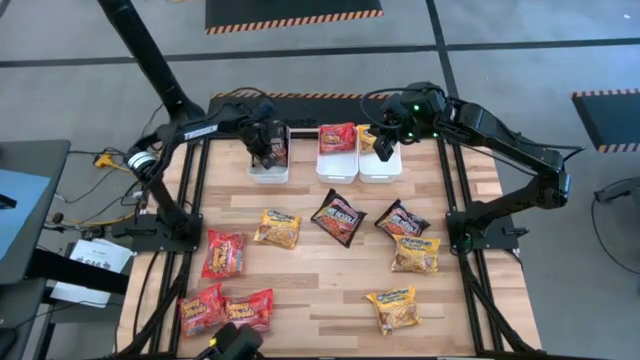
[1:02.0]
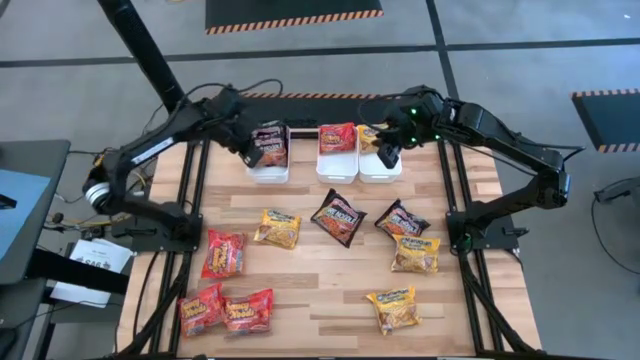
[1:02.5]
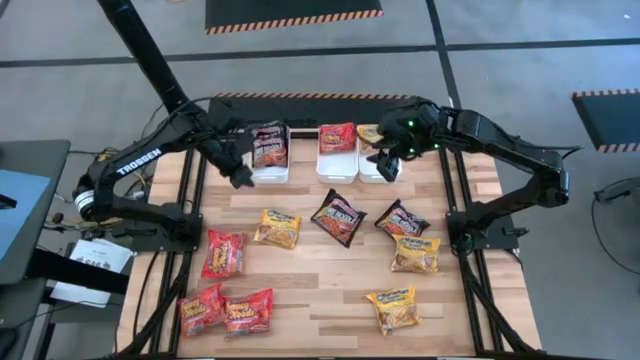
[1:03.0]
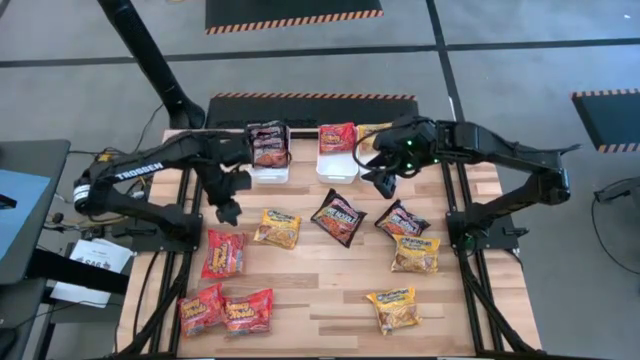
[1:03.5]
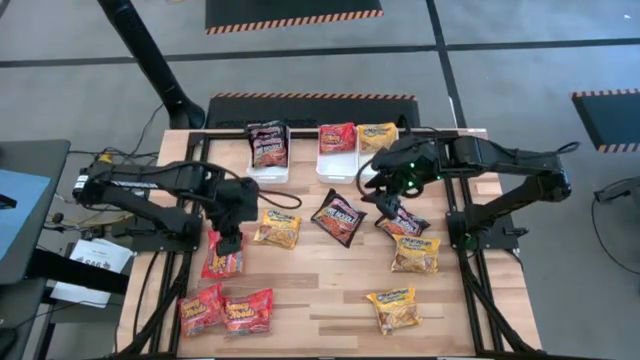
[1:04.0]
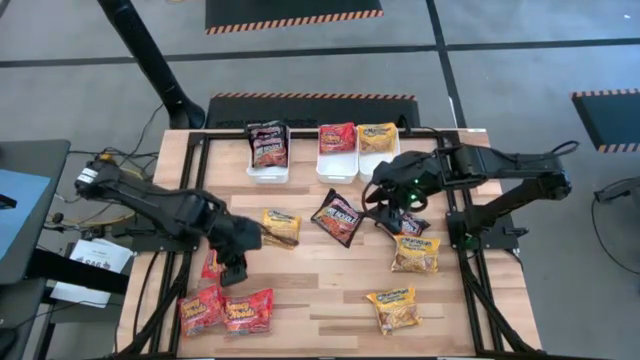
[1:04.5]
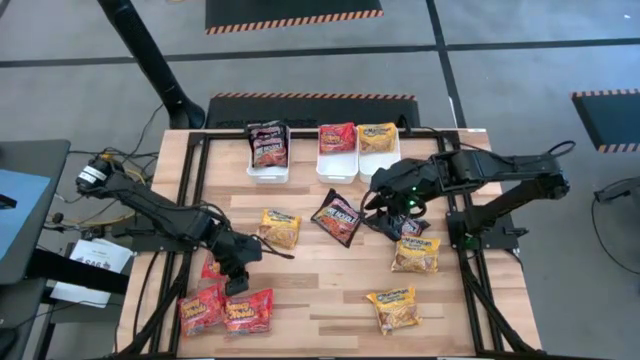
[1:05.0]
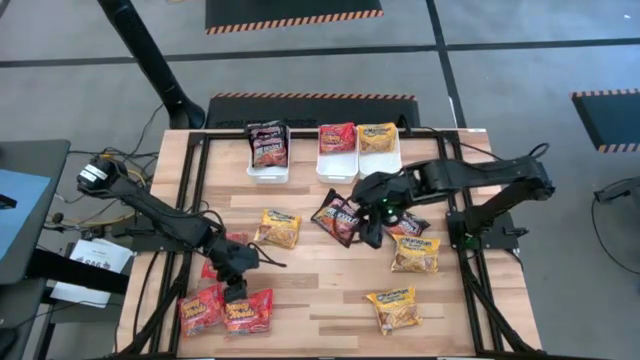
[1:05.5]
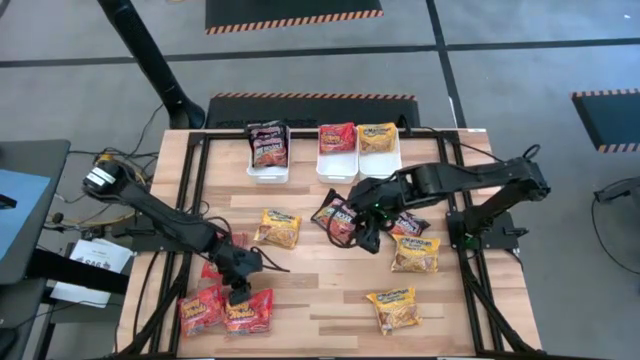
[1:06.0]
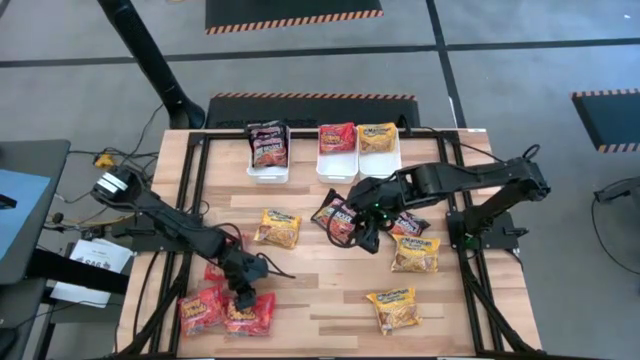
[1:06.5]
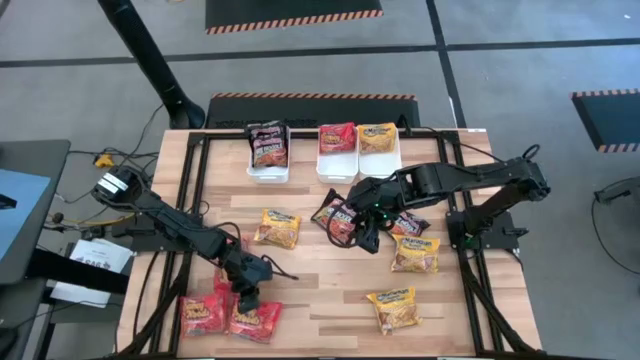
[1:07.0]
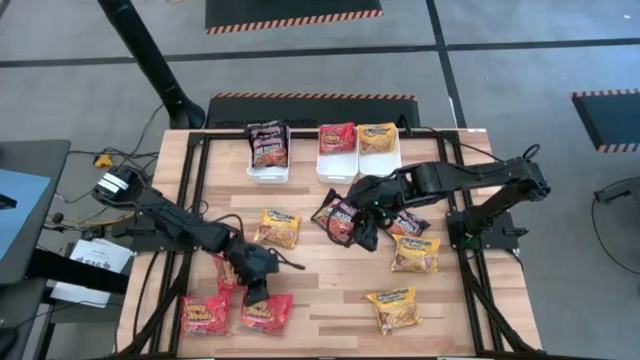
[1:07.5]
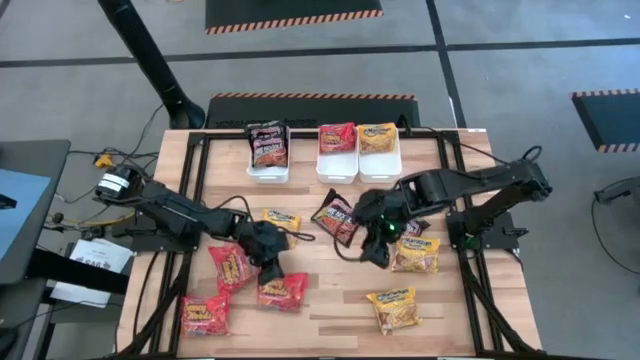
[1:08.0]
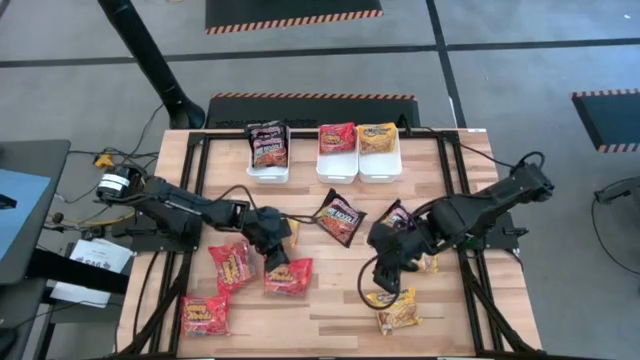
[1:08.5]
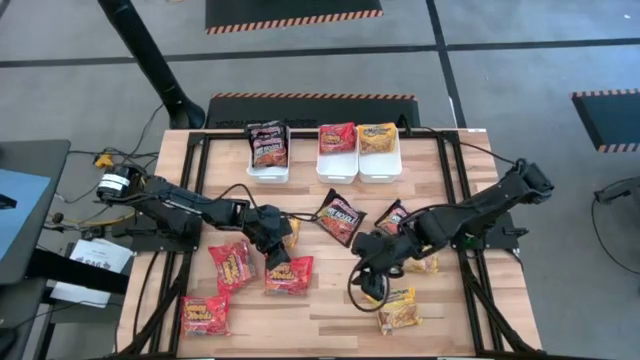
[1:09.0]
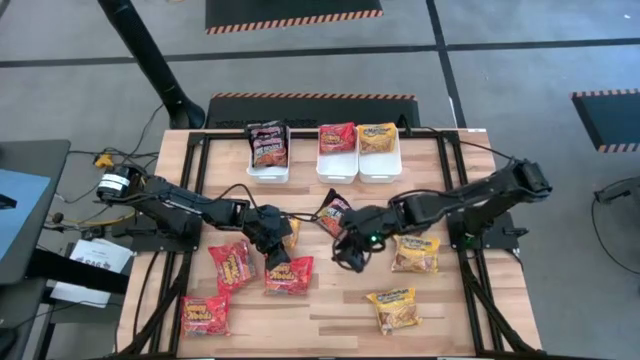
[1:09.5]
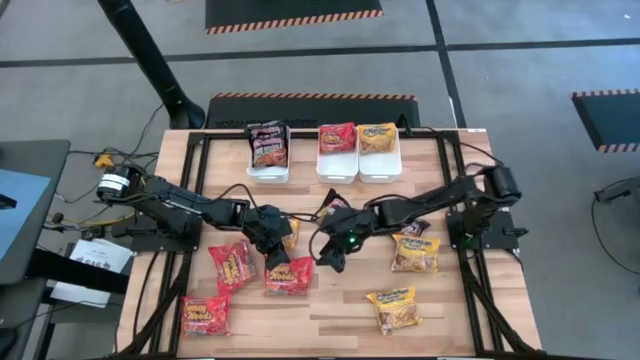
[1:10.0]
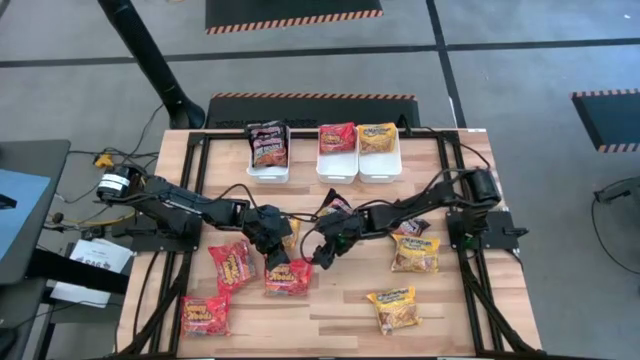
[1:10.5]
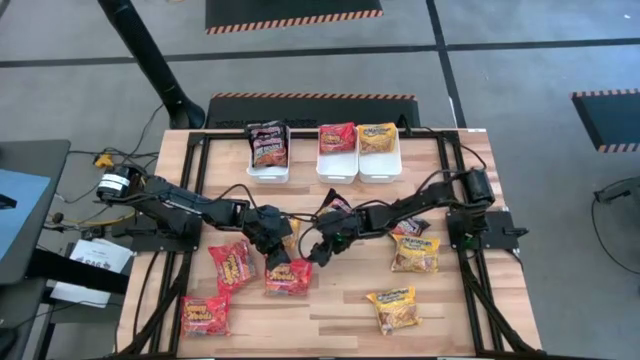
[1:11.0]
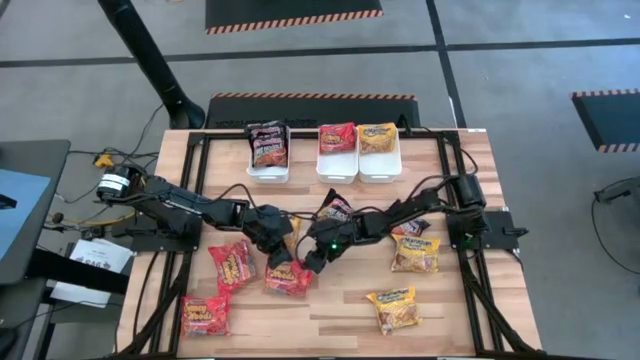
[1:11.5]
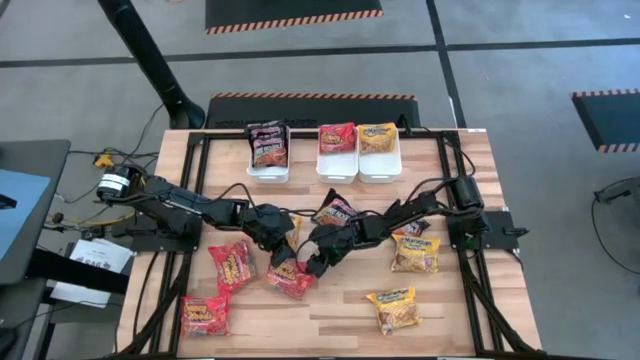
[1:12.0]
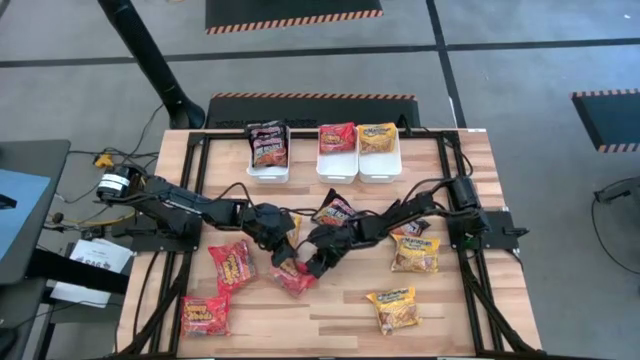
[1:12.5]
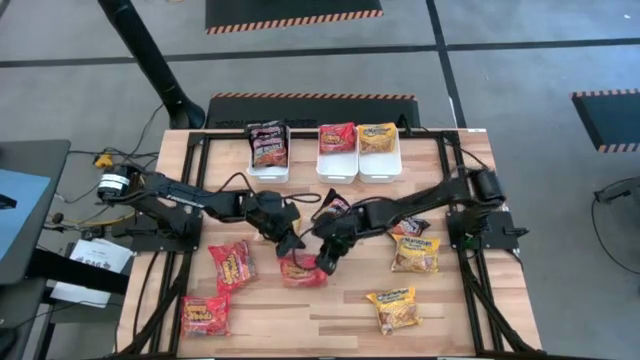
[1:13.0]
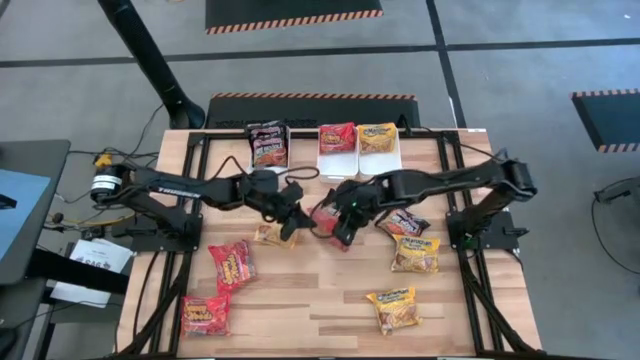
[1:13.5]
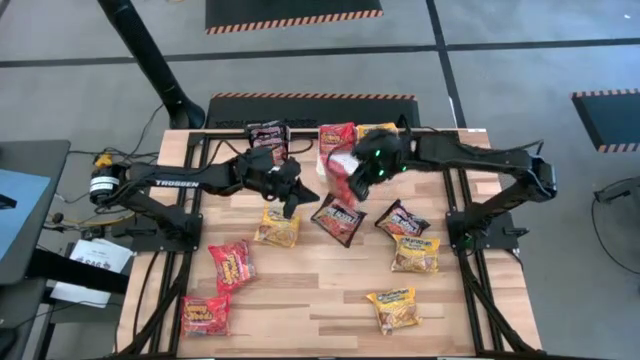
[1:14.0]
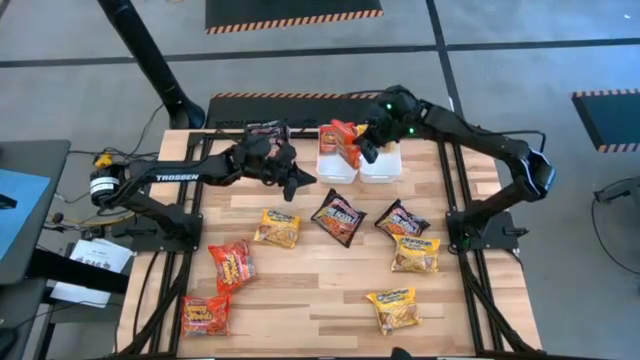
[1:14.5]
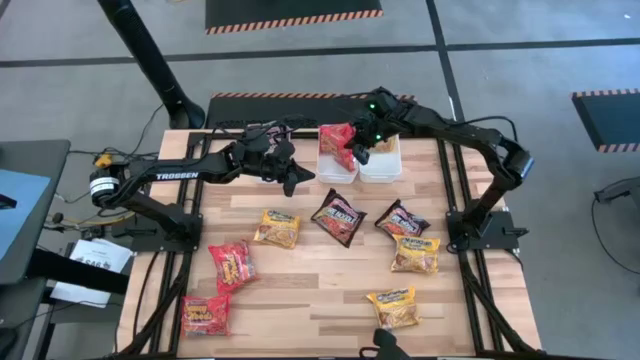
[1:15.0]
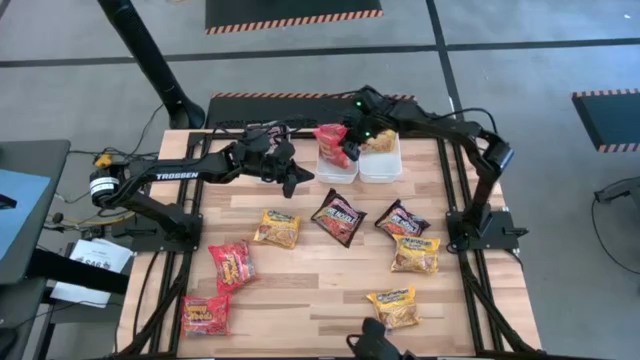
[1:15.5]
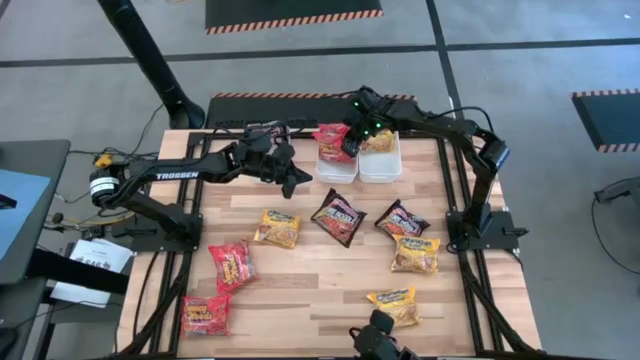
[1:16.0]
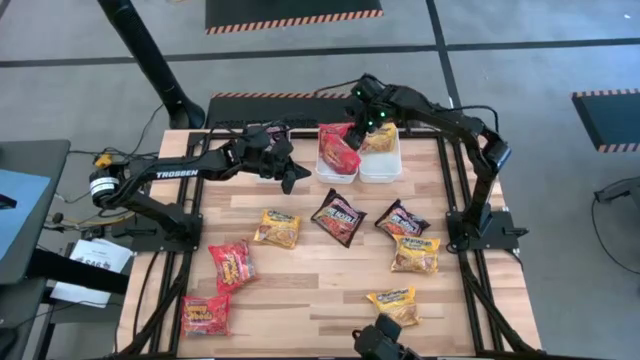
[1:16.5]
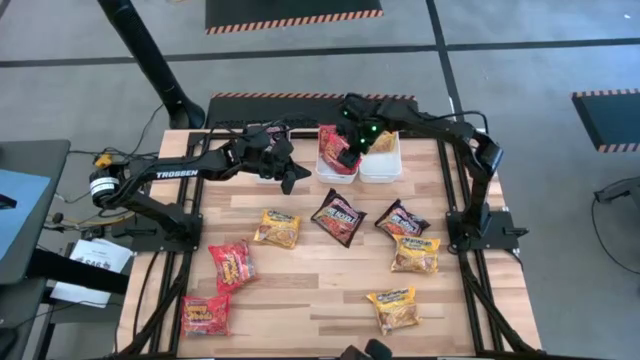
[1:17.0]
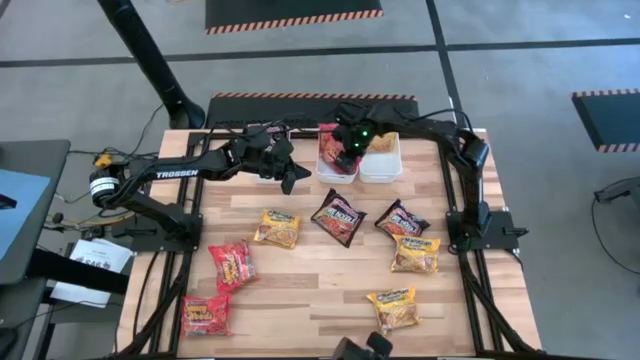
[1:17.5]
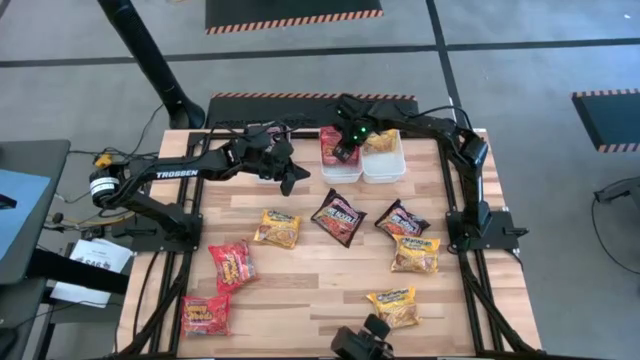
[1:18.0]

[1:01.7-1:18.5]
Task: Sort Maruchan noodles
Put the red noodle pack into the middle white bin

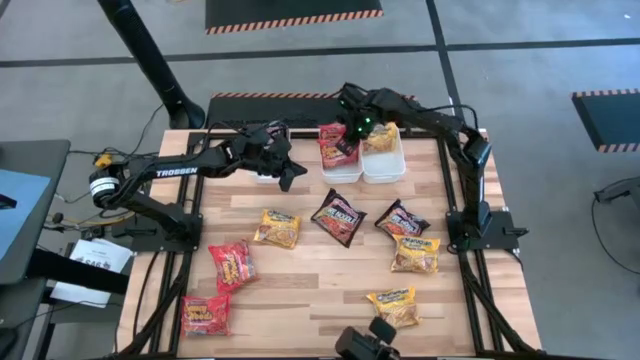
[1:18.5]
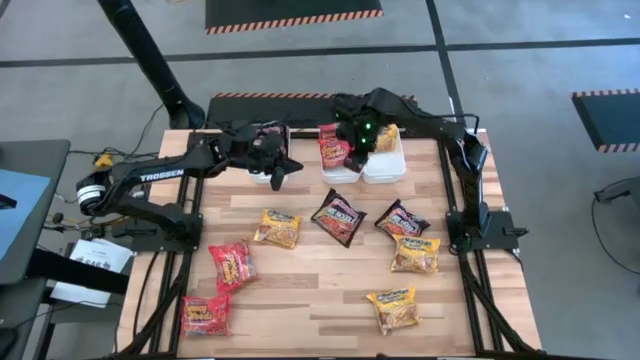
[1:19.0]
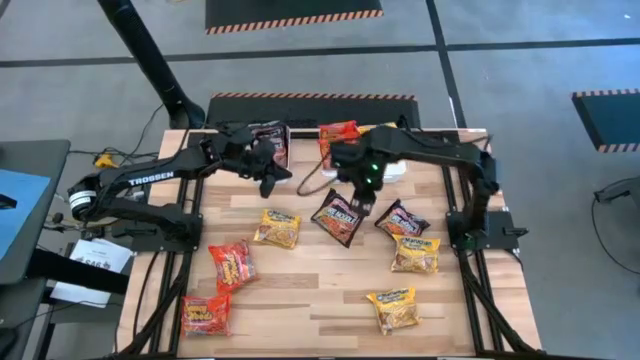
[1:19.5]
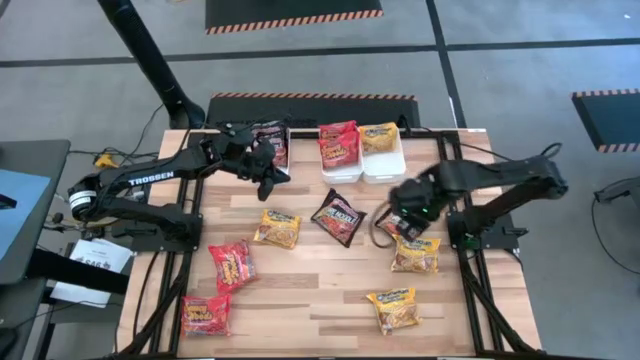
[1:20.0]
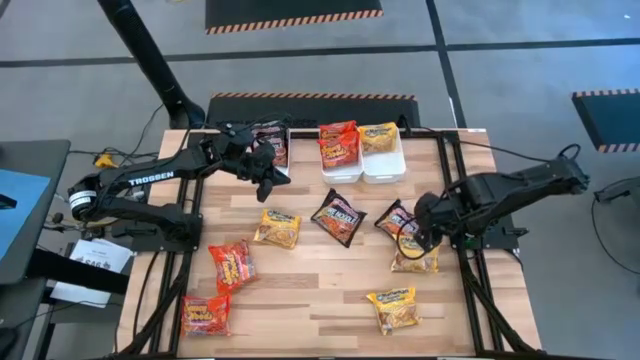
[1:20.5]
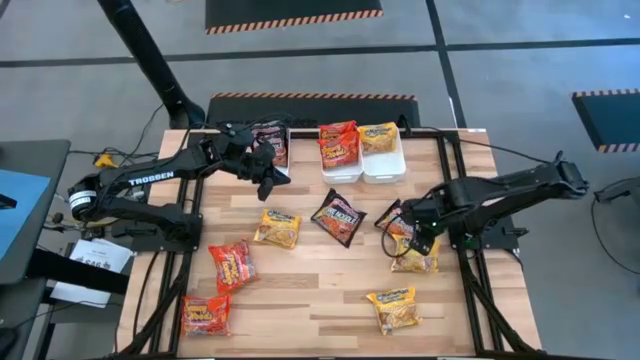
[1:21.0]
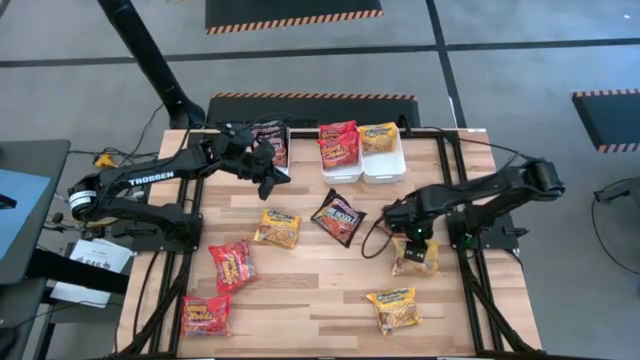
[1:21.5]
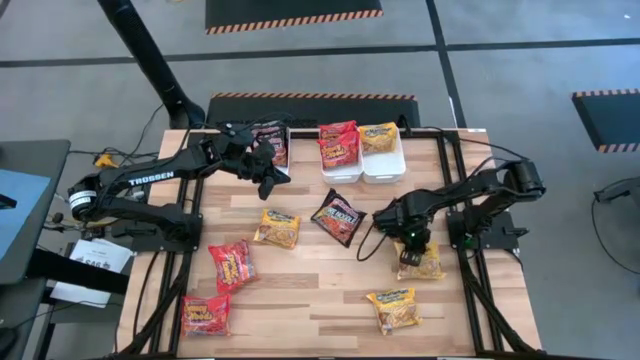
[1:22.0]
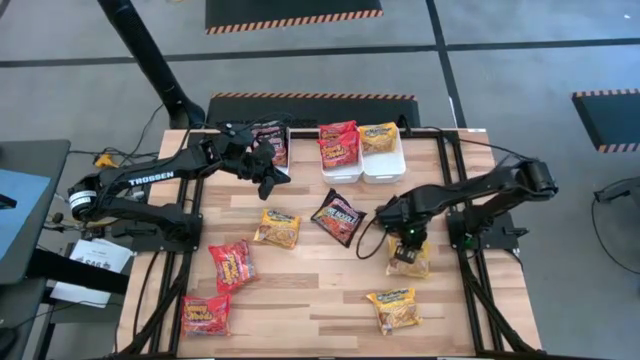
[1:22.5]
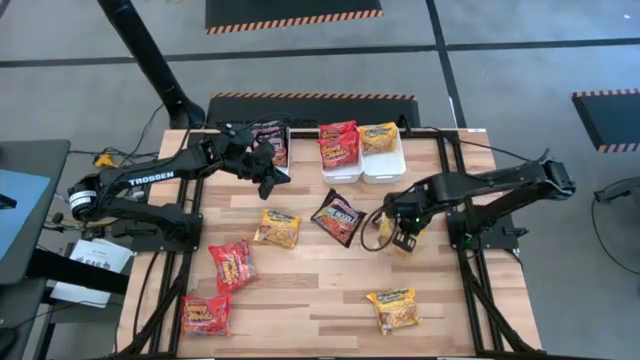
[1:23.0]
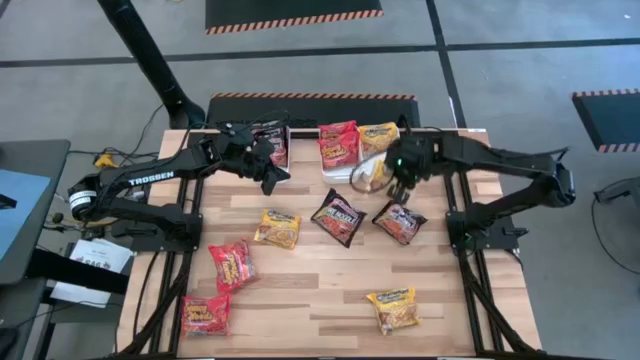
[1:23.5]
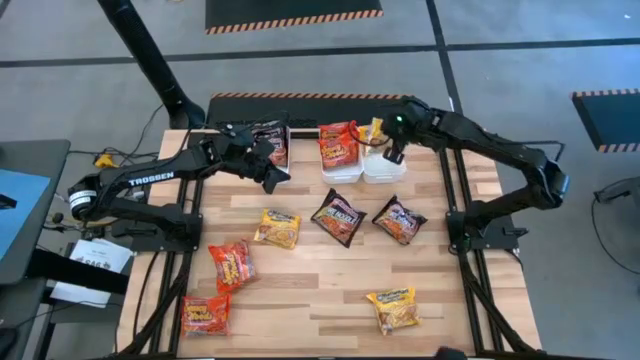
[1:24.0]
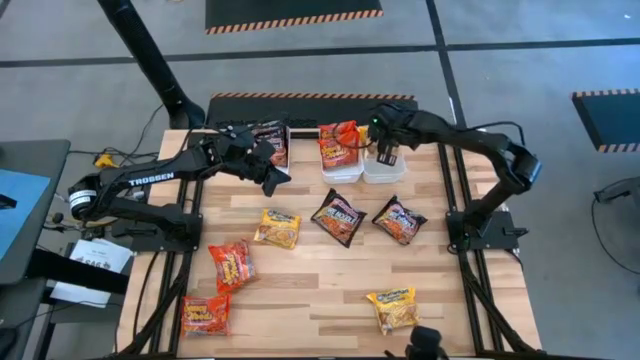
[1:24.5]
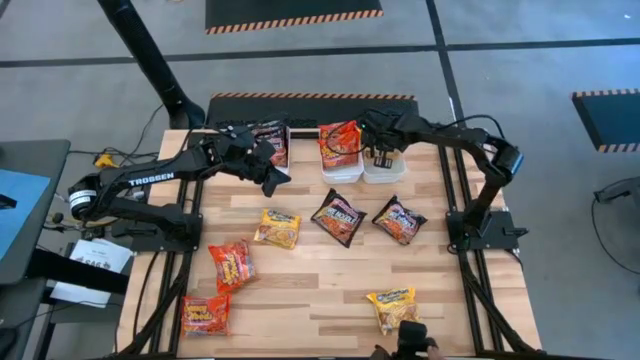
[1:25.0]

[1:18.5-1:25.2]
Put the yellow noodle pack into the right white bin
